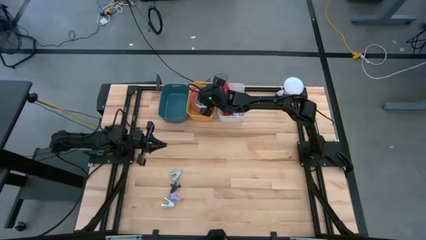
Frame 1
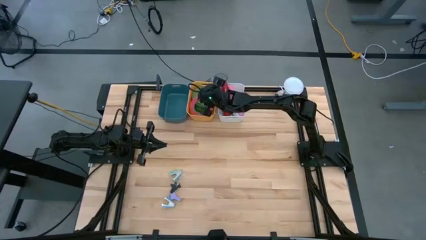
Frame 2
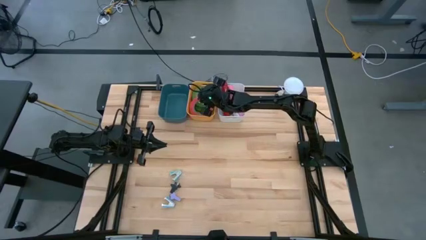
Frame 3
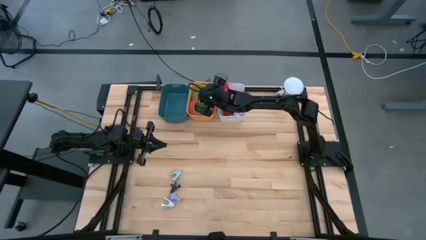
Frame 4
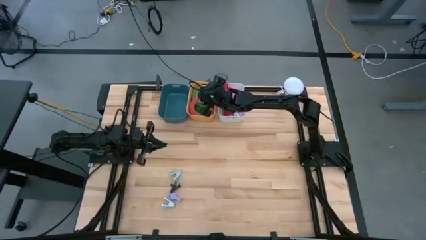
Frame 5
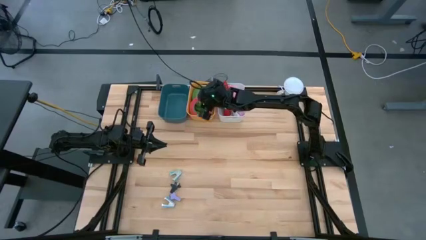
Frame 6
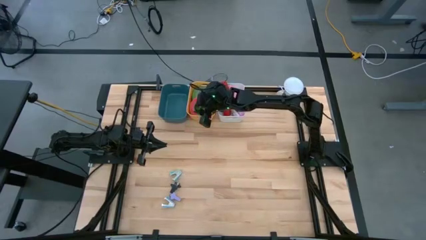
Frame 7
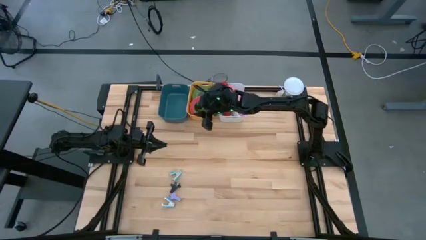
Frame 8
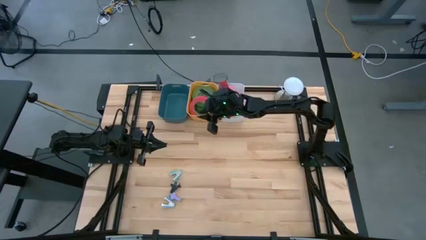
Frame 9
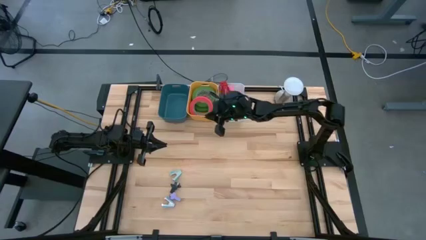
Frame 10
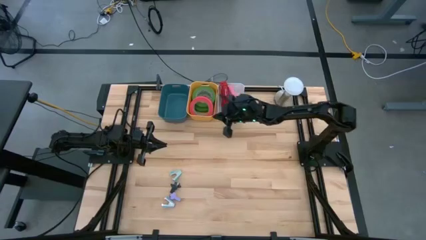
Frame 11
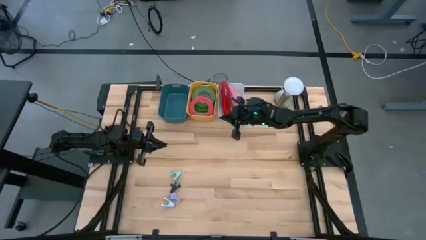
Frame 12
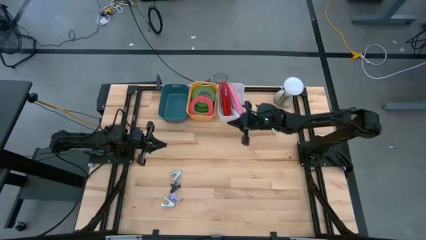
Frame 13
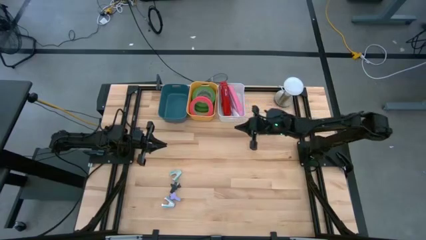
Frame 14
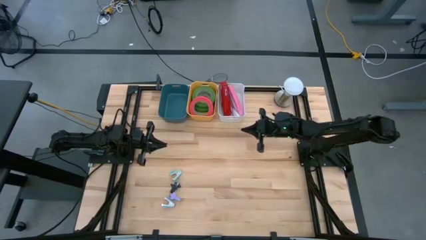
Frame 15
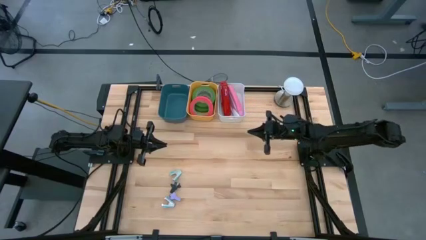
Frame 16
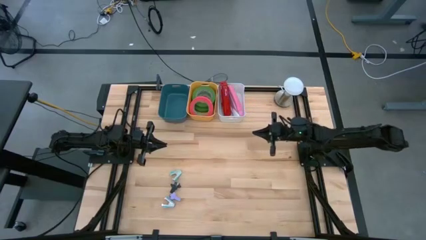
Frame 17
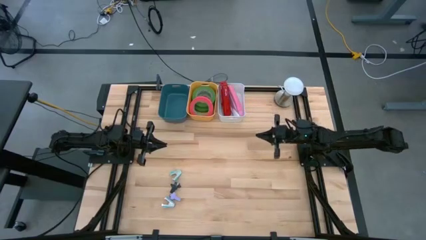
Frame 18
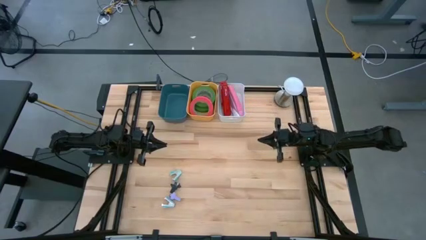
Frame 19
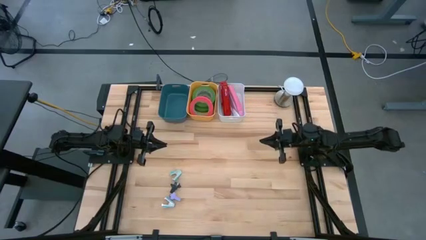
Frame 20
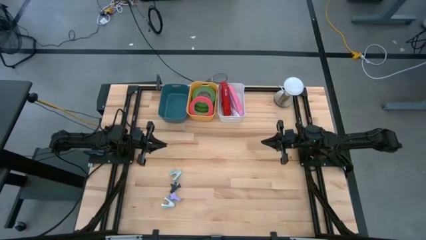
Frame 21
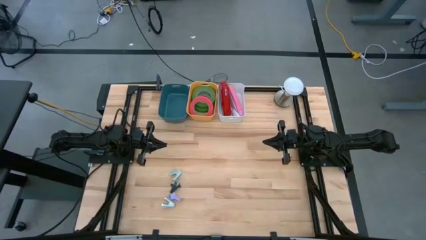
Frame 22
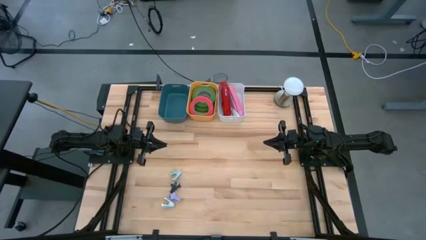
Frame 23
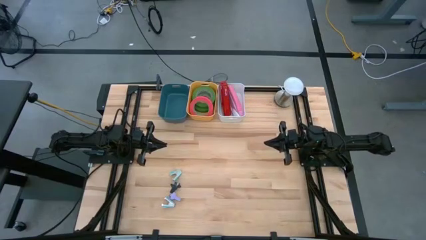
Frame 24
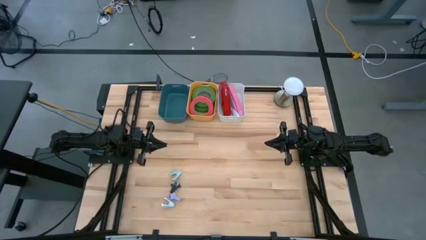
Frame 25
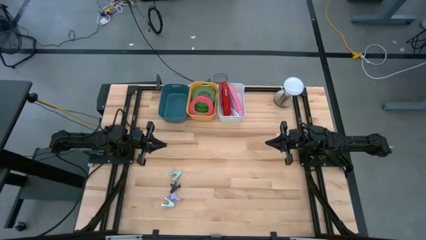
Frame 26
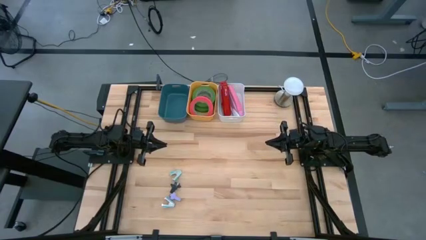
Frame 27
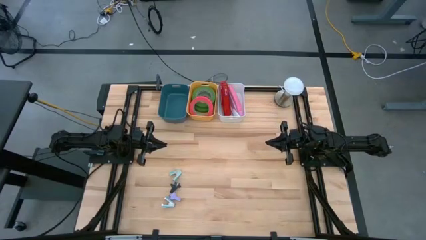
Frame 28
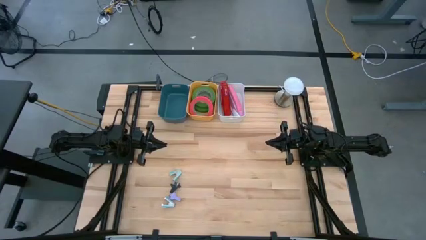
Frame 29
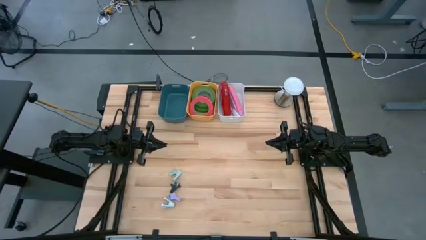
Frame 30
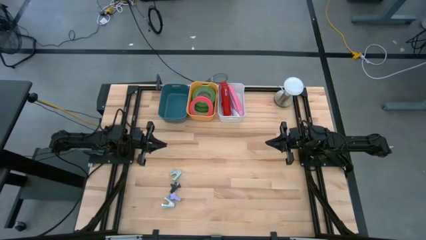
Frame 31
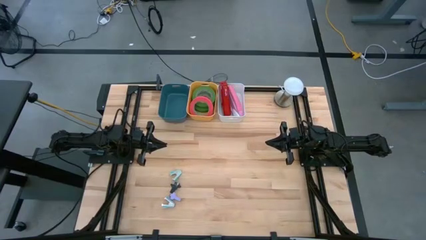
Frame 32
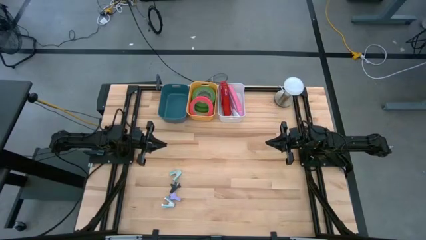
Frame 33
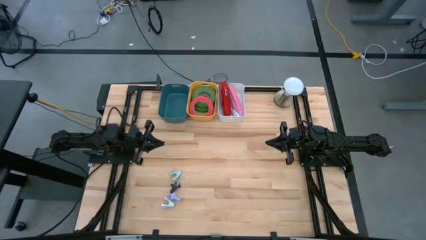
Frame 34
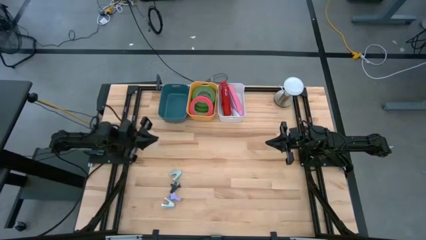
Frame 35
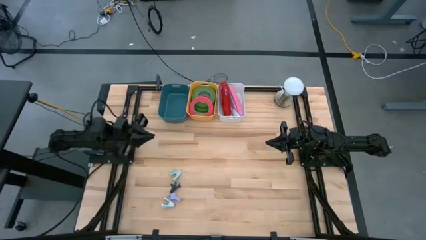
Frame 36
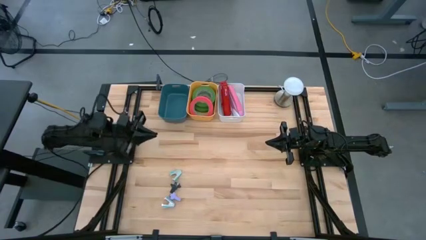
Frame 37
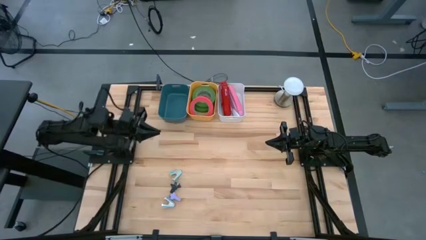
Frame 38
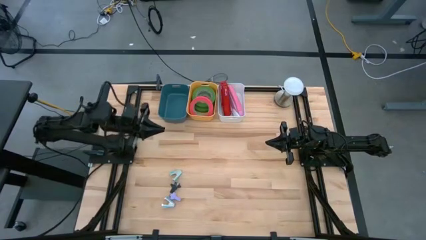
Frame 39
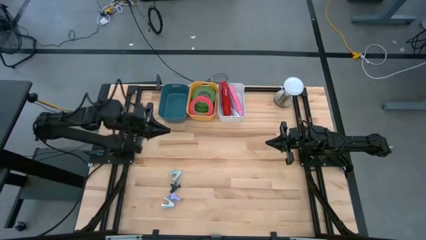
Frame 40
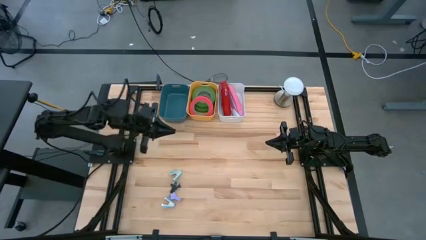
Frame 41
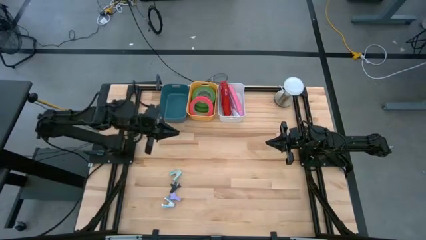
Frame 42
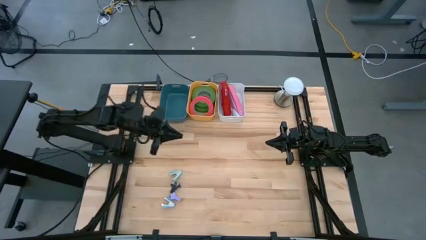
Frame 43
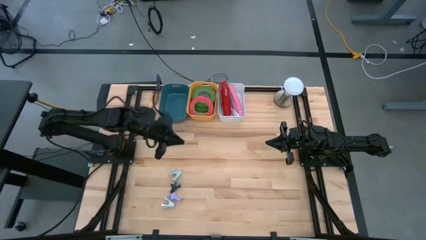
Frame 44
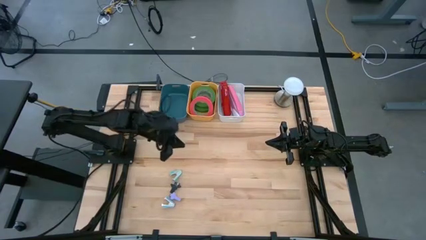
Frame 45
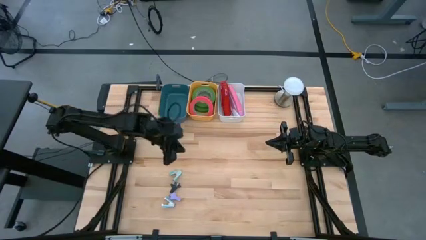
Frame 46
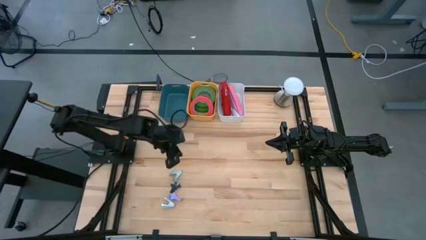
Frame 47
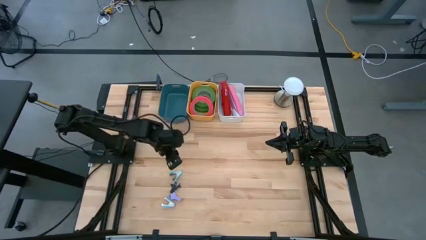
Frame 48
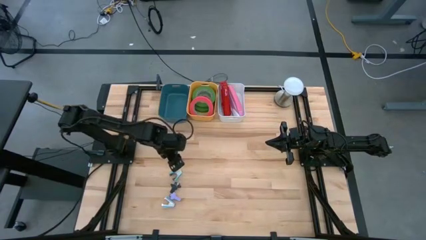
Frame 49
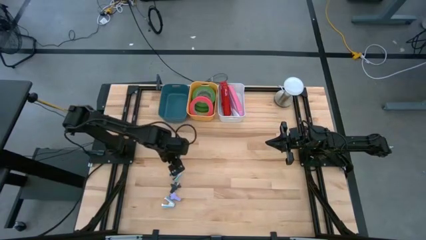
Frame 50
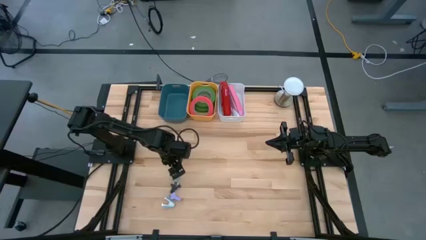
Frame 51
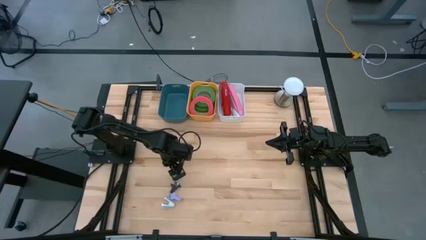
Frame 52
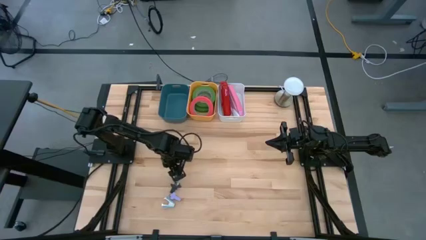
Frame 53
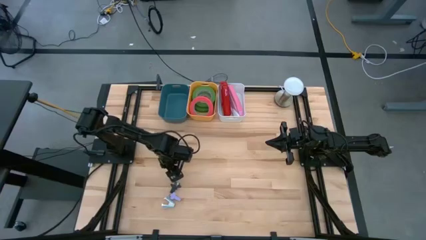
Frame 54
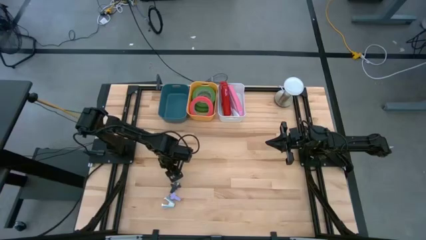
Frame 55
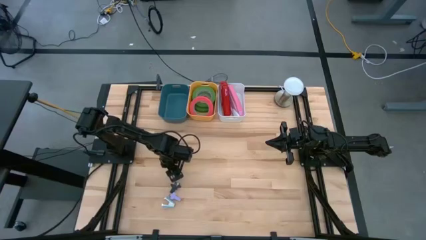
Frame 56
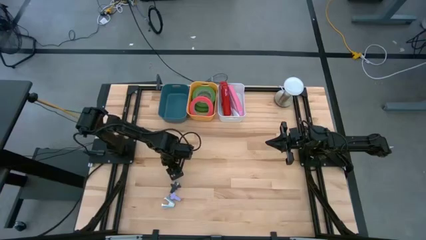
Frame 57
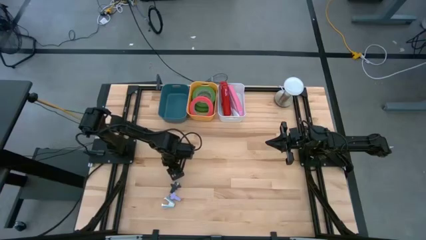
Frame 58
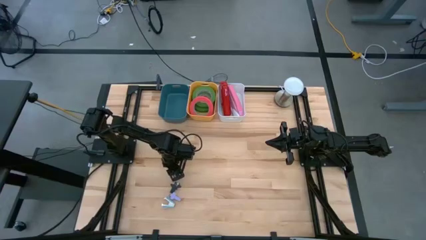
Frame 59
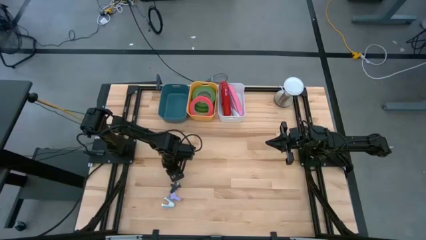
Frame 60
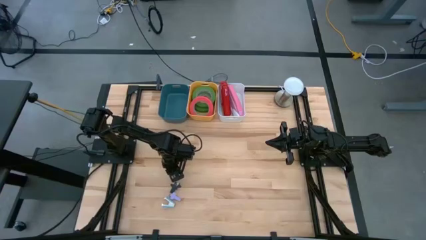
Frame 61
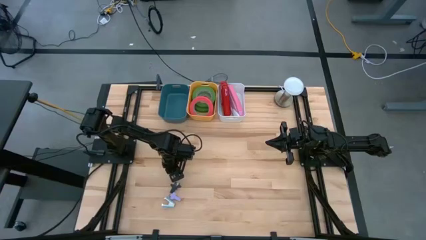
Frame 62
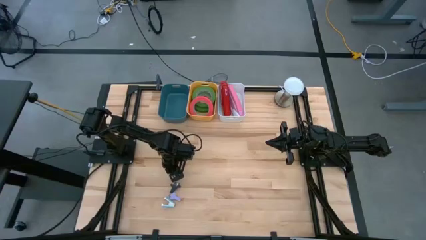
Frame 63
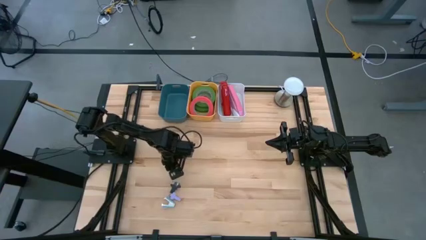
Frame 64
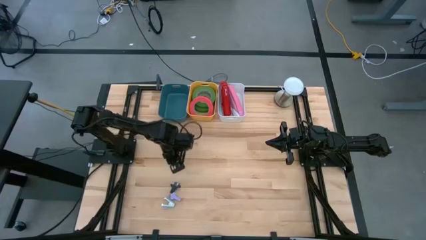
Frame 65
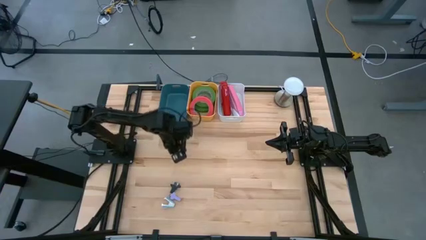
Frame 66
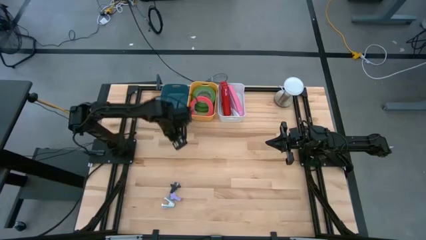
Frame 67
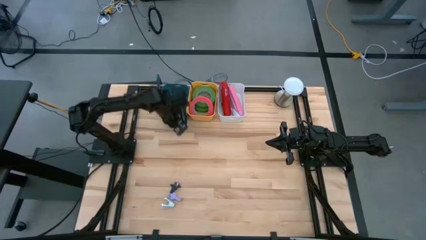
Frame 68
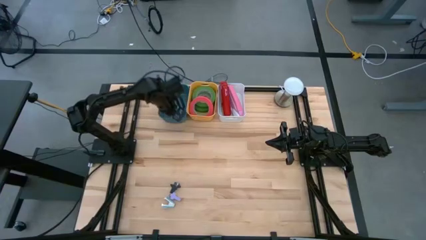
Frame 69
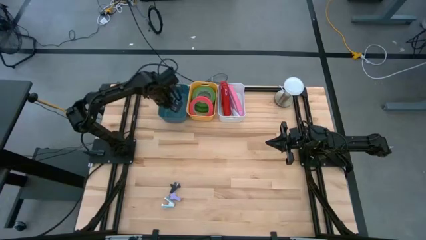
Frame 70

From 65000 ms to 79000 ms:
Task: Pick and place Stapler, Stapler remover, tape
Put the top blue staple remover into the blue bin

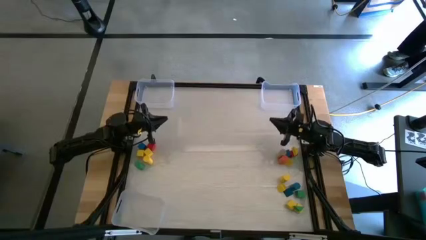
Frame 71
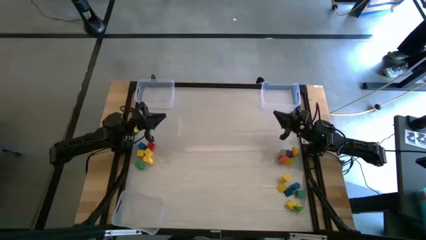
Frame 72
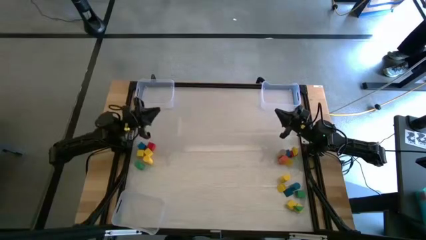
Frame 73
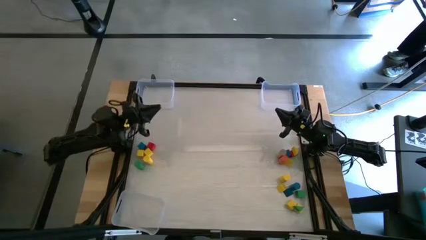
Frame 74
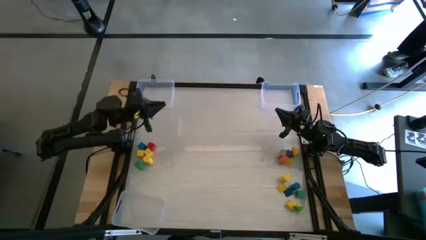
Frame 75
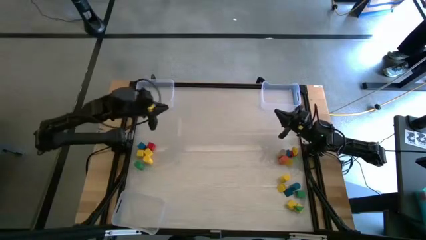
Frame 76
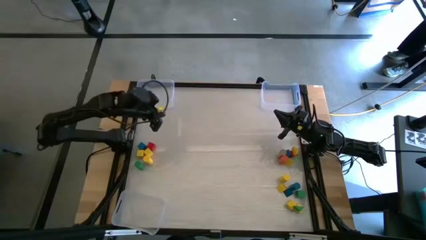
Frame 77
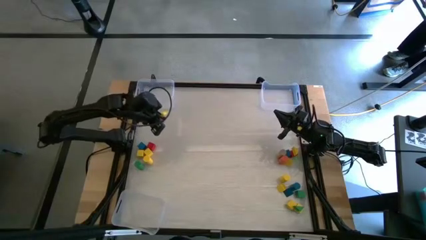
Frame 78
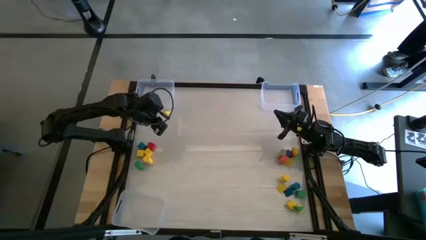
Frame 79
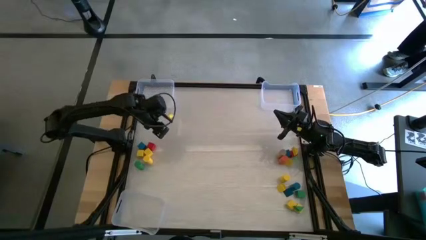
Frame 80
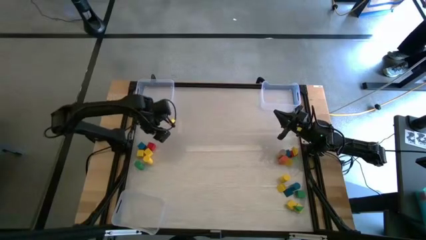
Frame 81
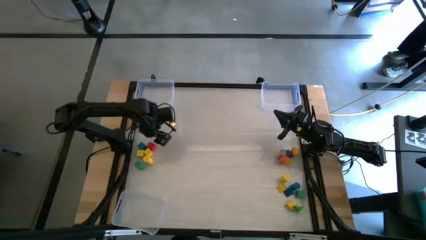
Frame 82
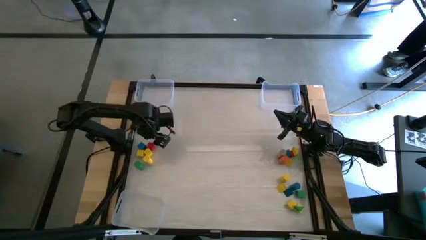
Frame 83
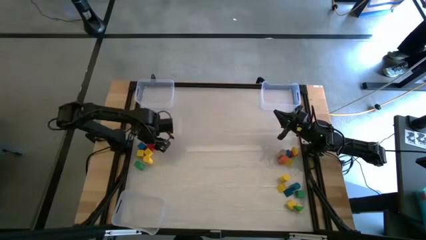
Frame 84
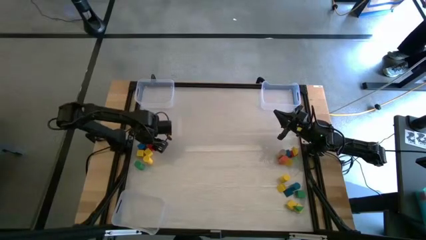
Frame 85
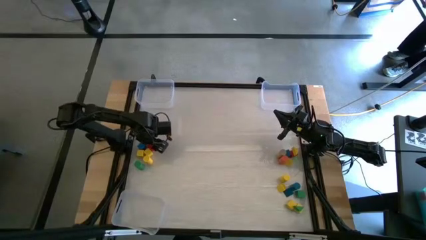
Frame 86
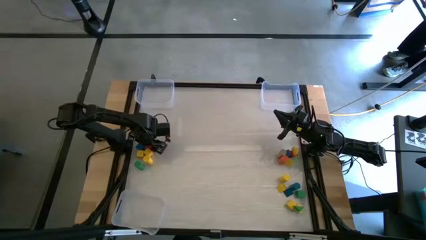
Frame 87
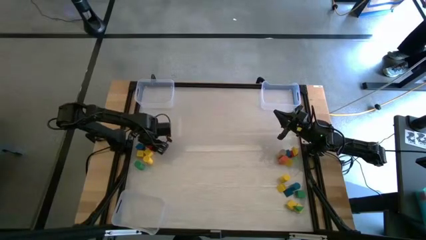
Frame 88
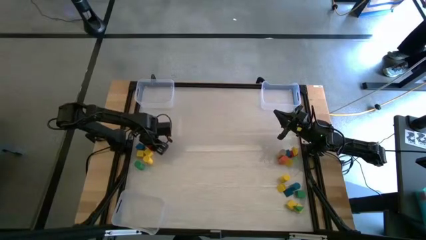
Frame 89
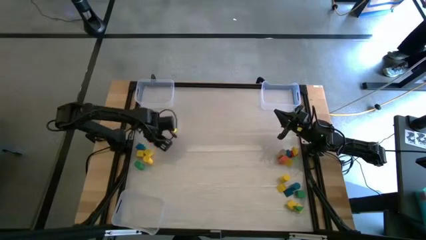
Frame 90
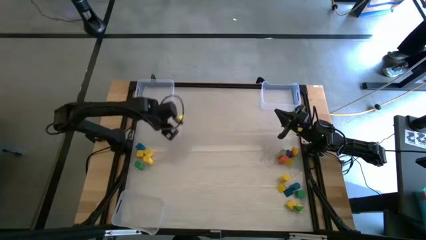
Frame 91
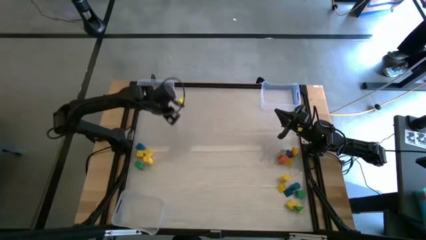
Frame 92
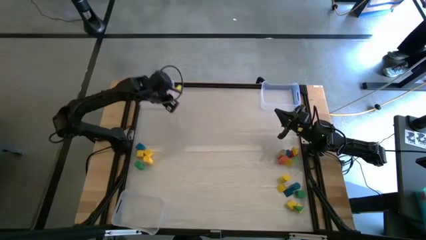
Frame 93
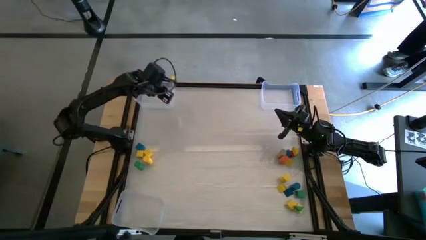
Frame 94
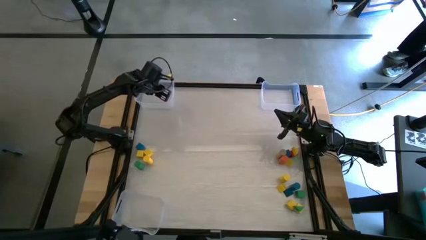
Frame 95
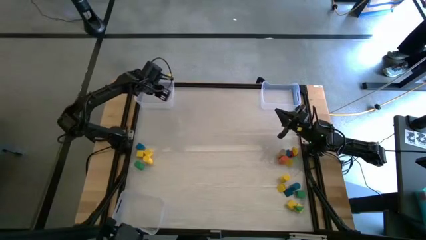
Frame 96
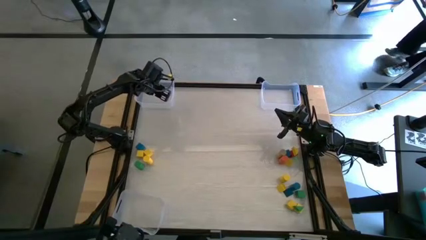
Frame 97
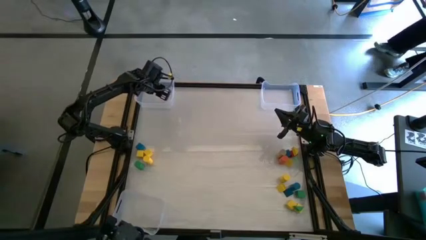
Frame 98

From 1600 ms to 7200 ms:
Task: Sort blocks by size
Put the left red cube block into the top left transparent bin
